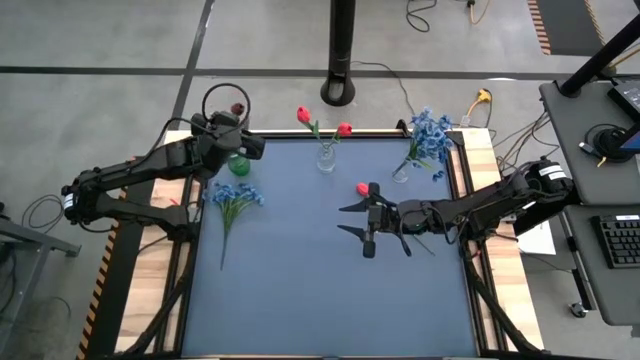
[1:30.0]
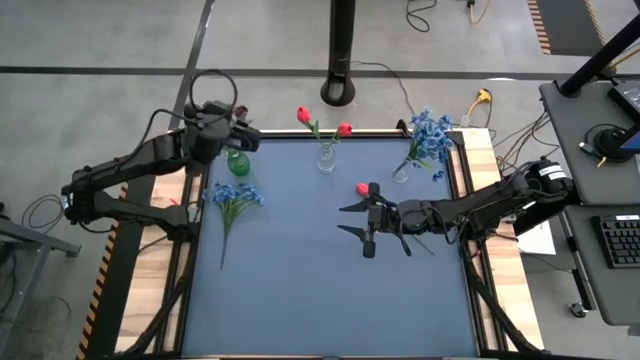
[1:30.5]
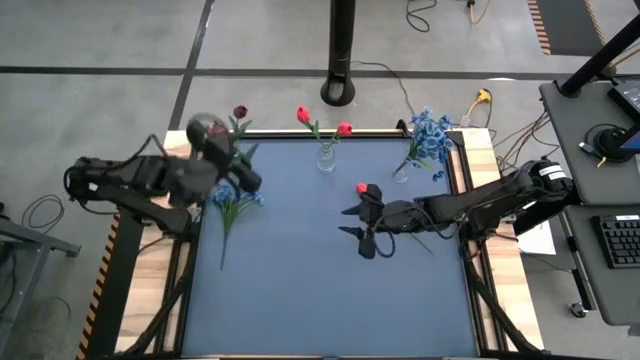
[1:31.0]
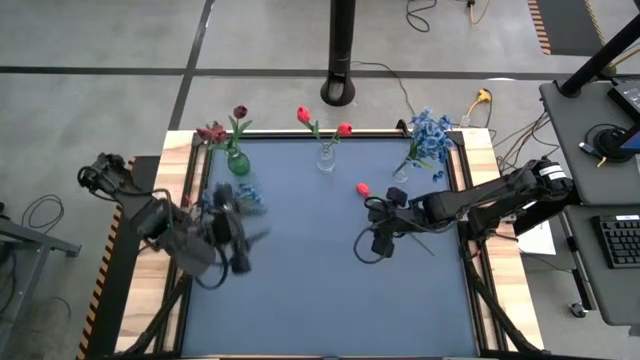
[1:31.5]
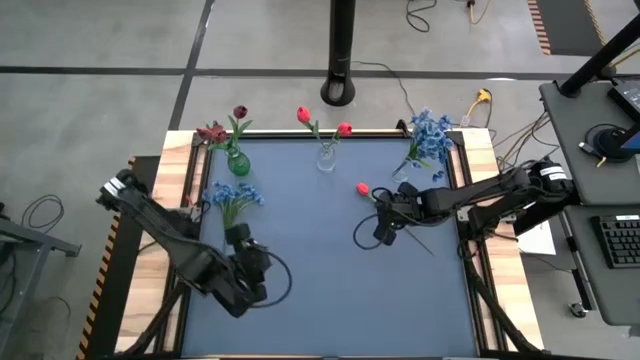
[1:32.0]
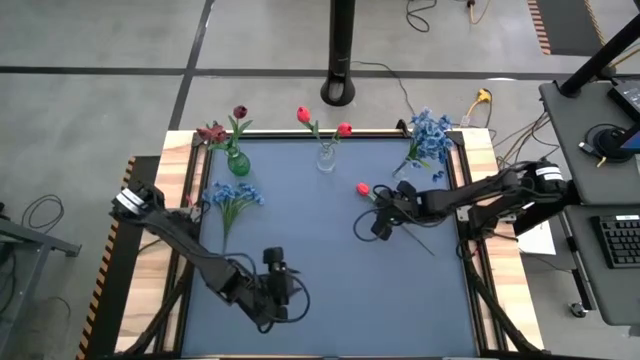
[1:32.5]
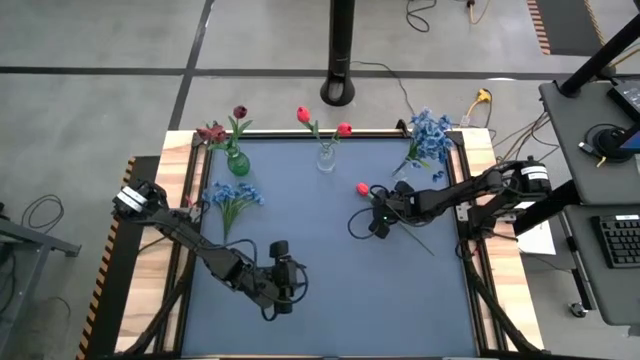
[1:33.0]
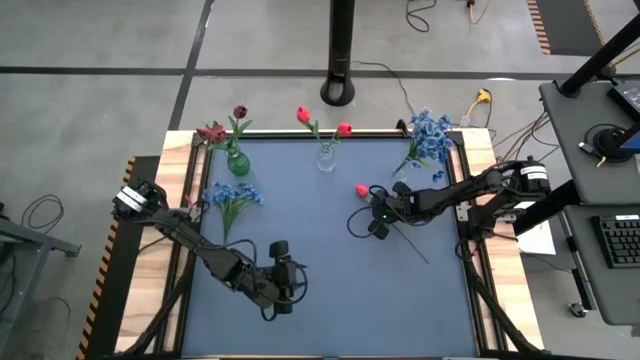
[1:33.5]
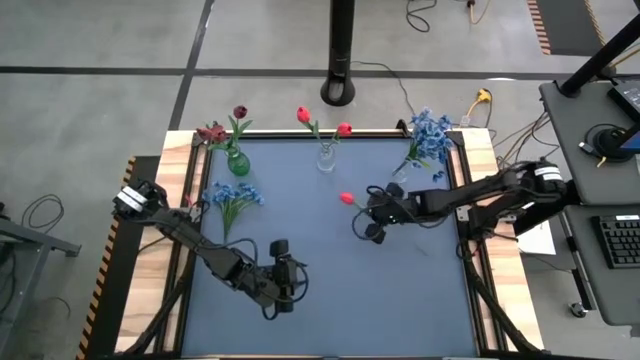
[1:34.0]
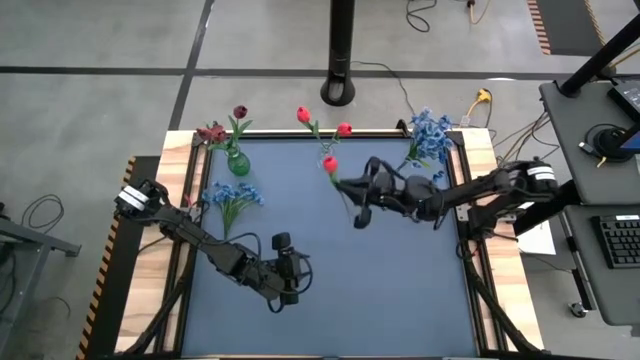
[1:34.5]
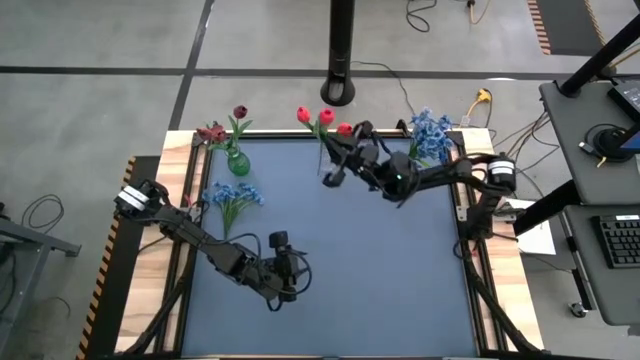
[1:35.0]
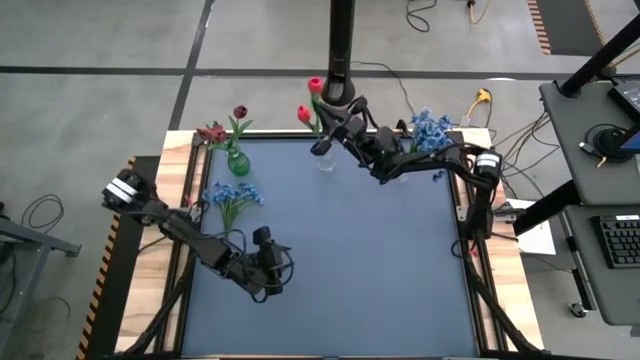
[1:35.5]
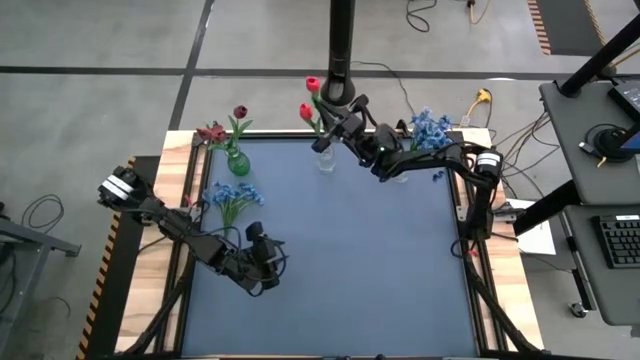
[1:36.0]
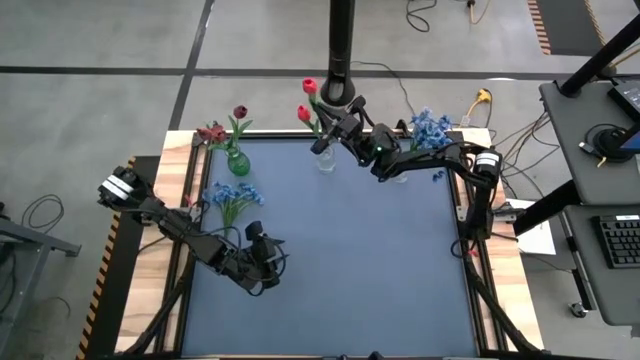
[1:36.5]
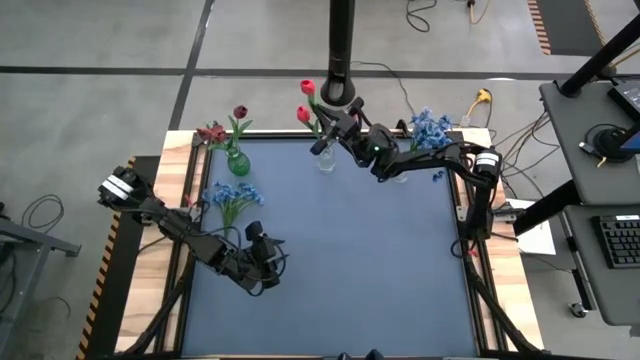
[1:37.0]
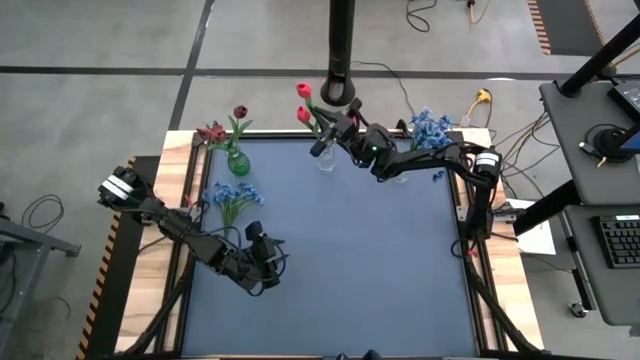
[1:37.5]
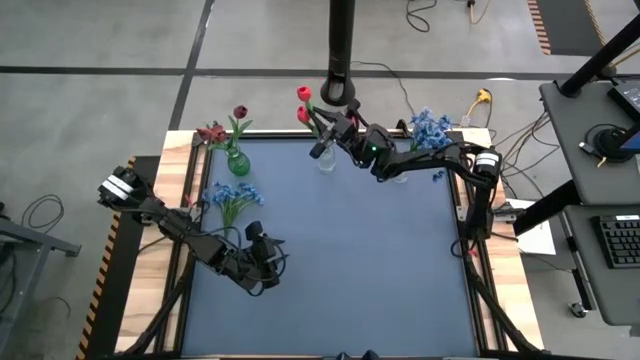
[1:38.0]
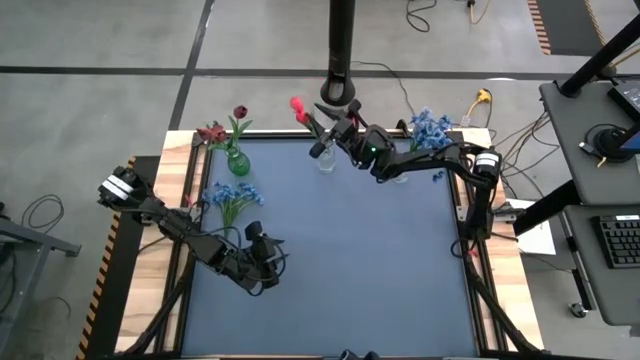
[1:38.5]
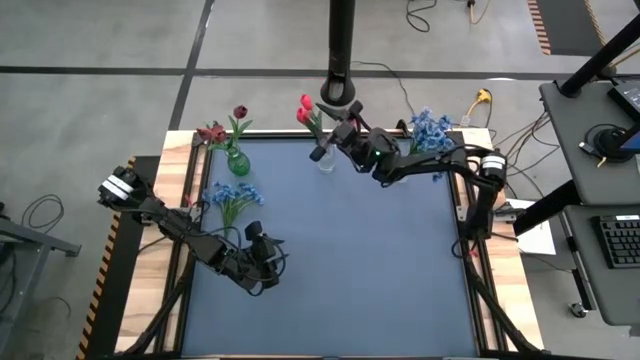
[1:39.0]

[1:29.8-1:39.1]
Task: Sort flowers into vase by color
Put the red flower into the left transparent vase

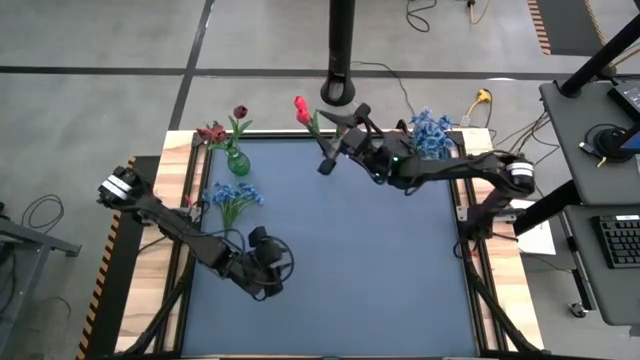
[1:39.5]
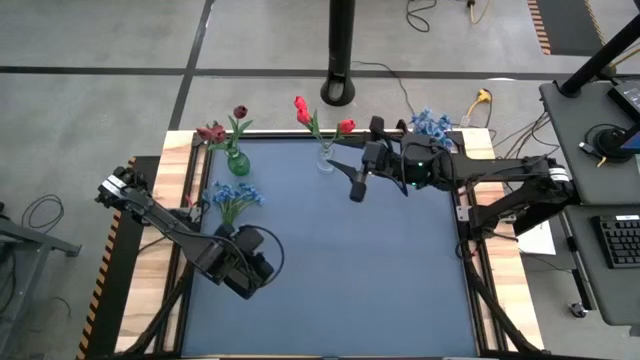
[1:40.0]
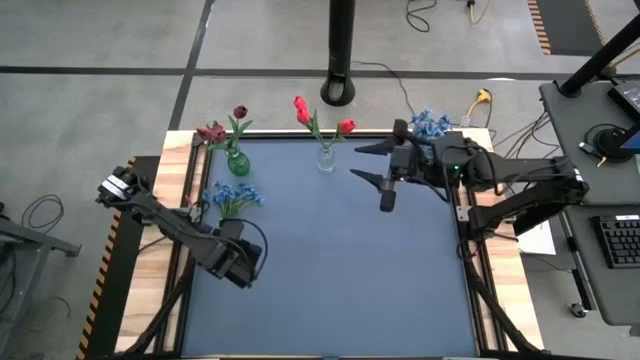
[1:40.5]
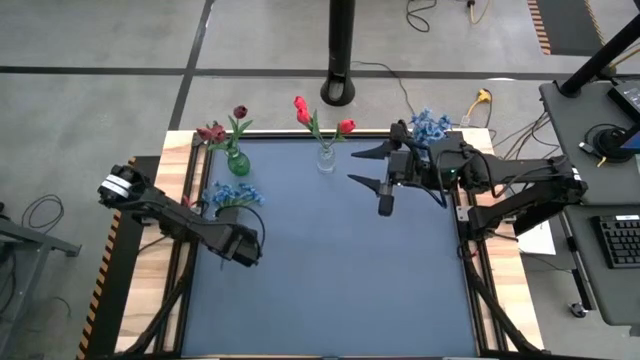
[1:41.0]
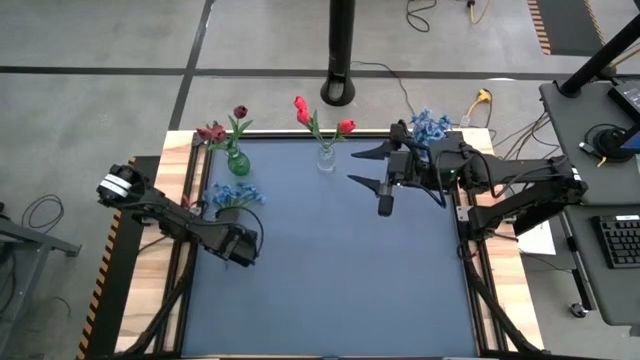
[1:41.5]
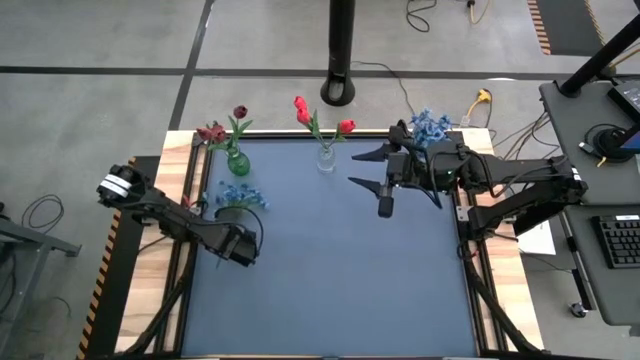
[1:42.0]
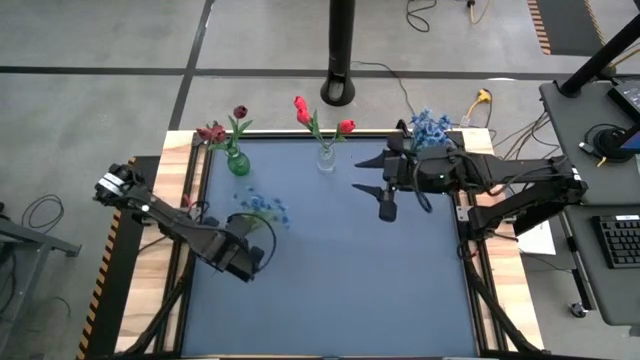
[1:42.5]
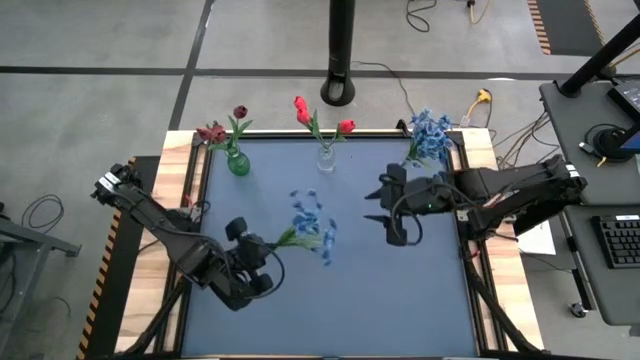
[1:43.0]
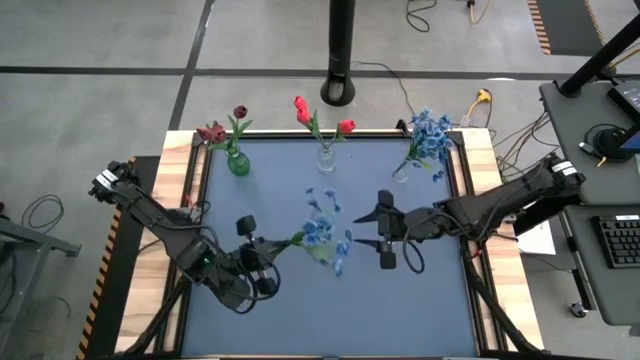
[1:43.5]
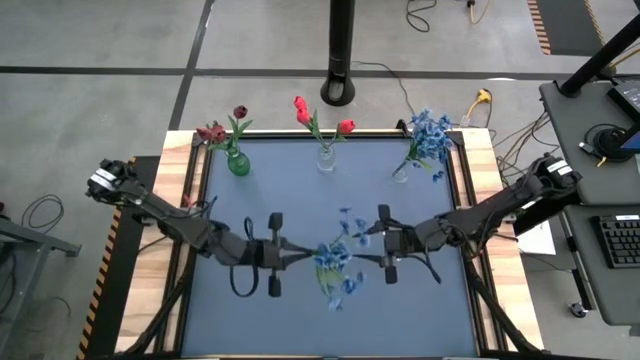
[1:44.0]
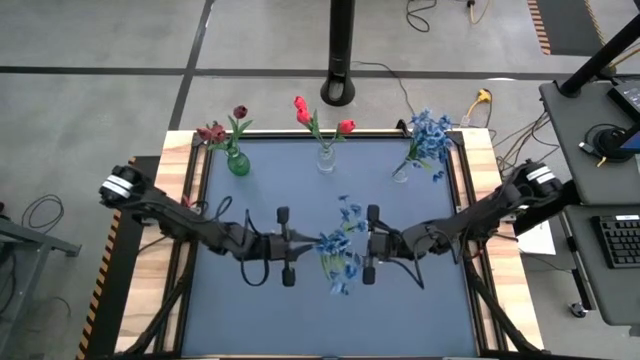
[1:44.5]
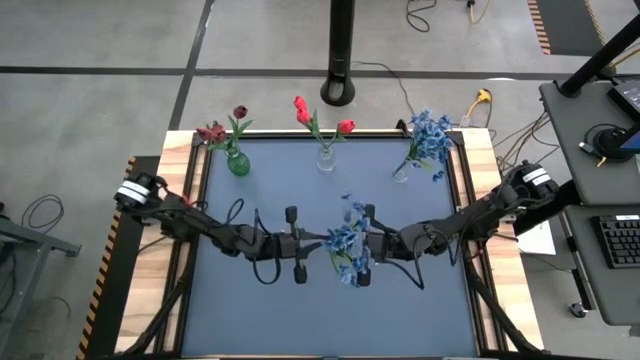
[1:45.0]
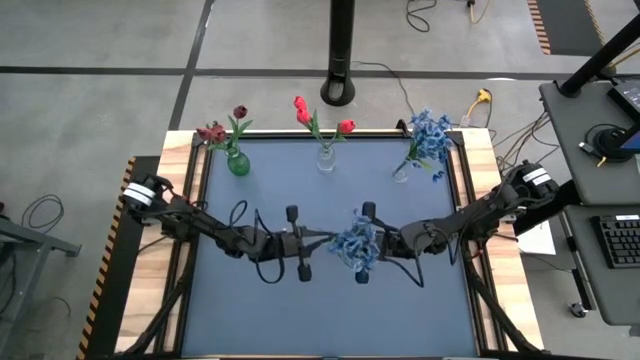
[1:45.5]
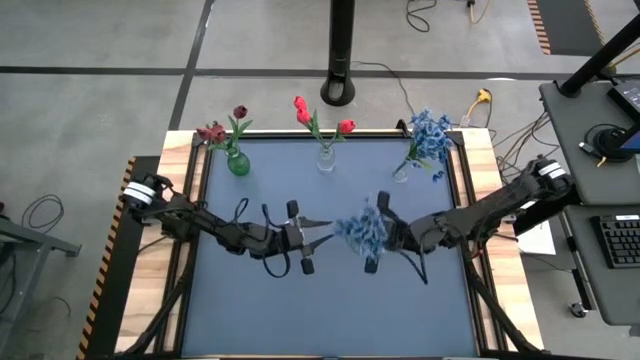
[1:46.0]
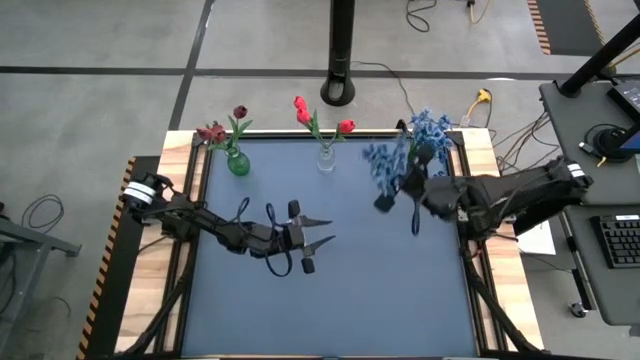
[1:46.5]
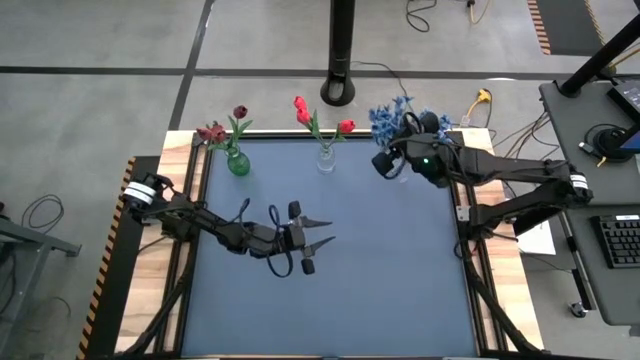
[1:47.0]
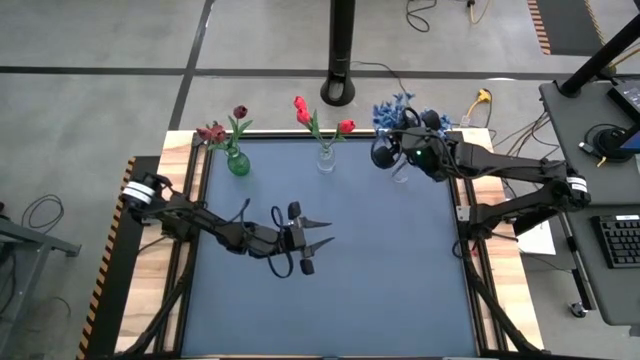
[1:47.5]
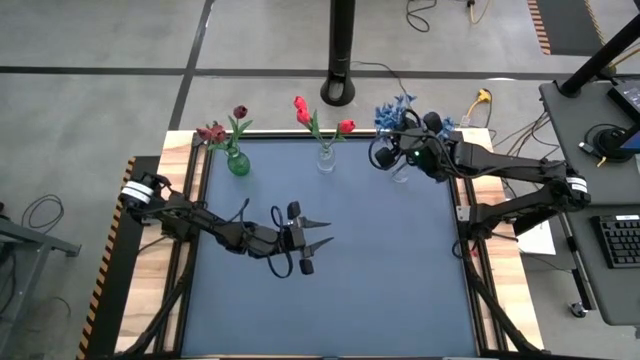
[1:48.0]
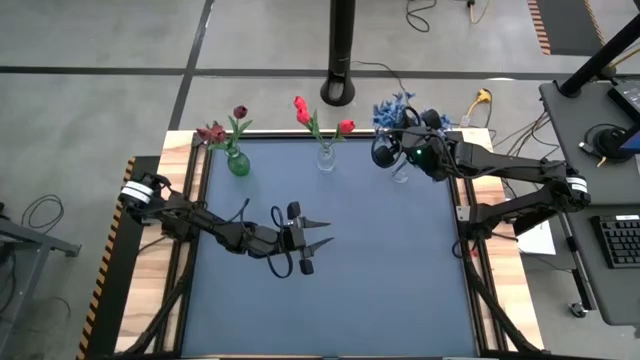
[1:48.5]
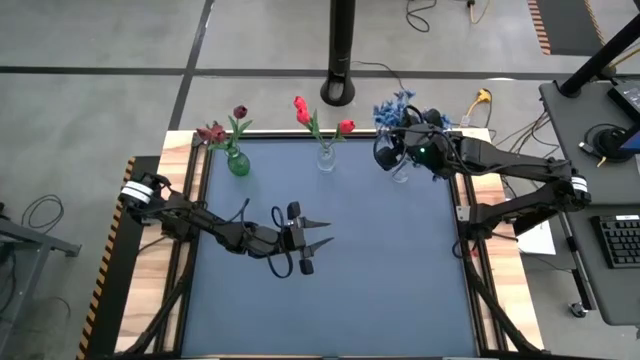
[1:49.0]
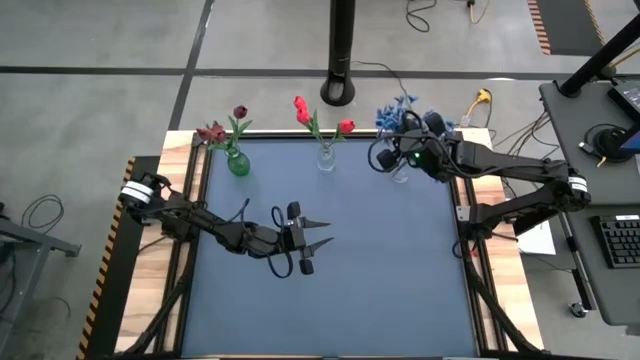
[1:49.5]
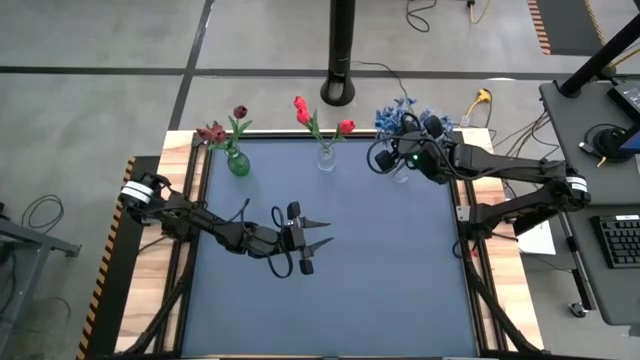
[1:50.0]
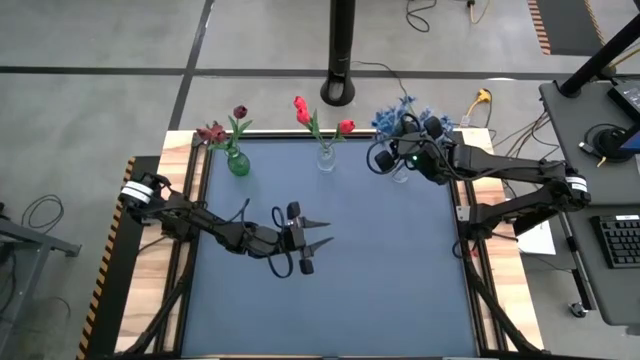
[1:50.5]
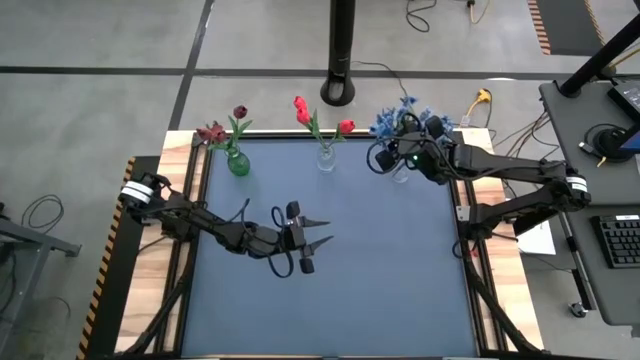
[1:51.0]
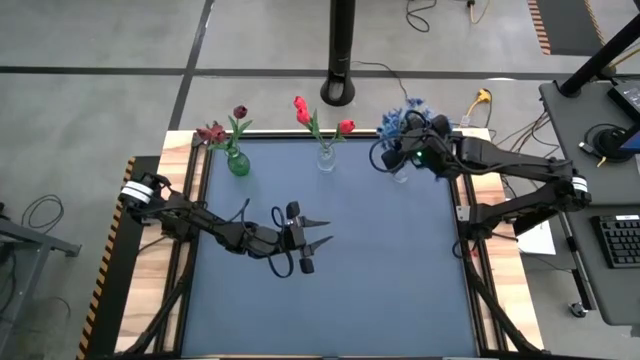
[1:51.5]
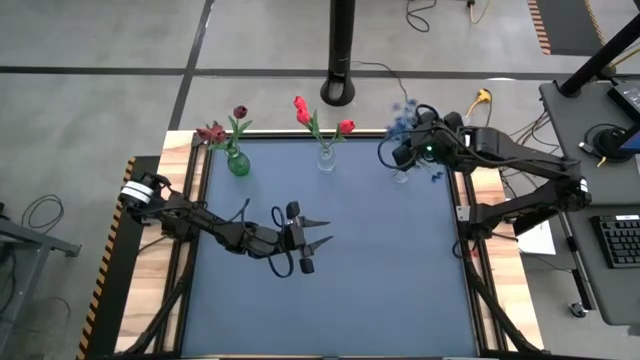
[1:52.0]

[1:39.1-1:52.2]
Put the blue flowers into the right transparent vase
